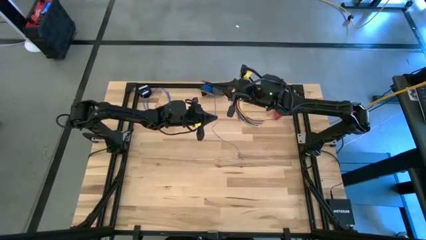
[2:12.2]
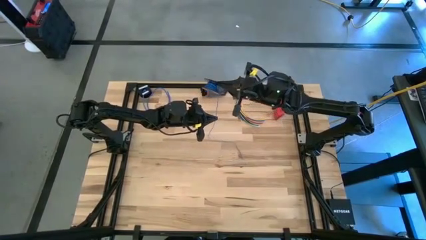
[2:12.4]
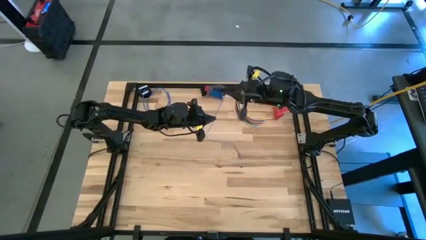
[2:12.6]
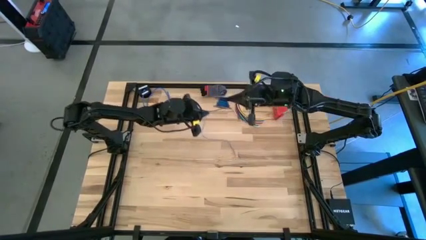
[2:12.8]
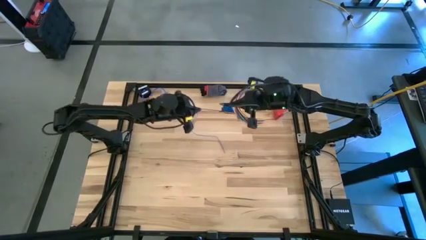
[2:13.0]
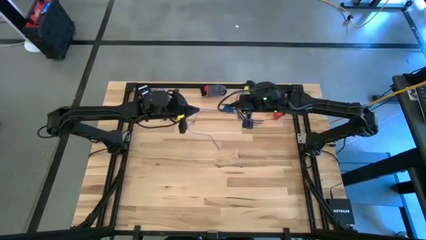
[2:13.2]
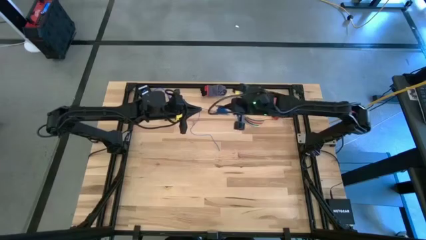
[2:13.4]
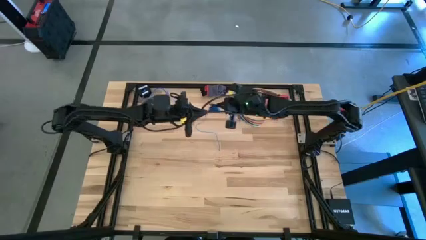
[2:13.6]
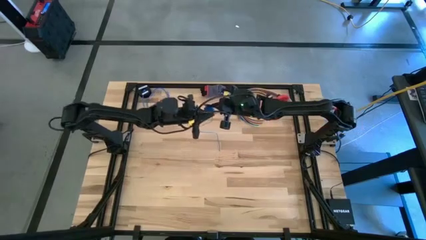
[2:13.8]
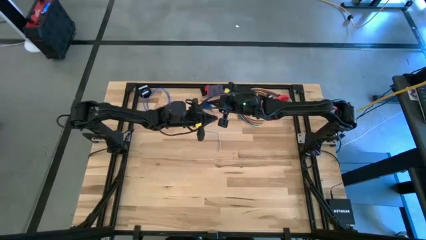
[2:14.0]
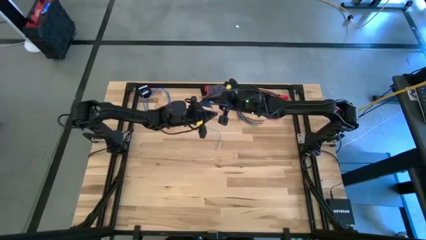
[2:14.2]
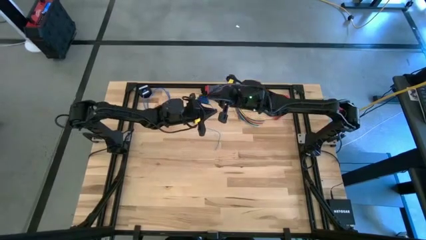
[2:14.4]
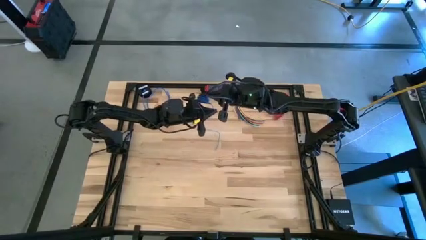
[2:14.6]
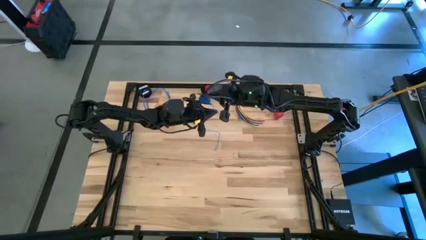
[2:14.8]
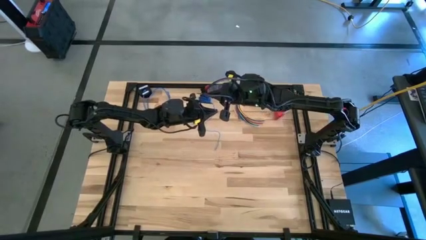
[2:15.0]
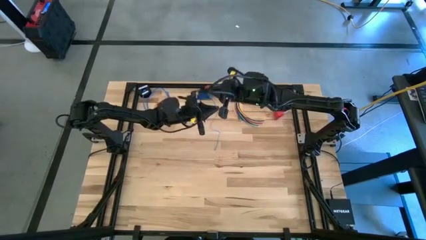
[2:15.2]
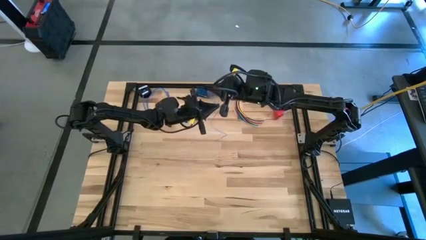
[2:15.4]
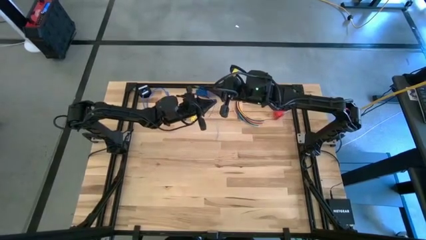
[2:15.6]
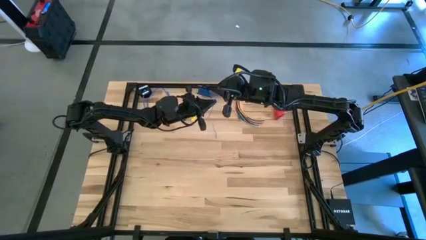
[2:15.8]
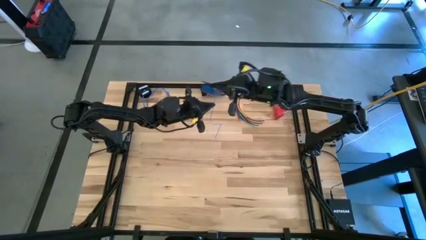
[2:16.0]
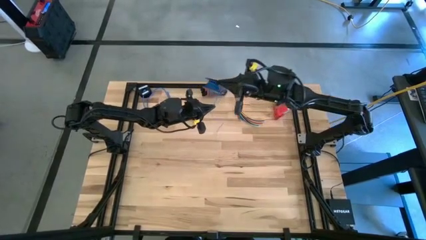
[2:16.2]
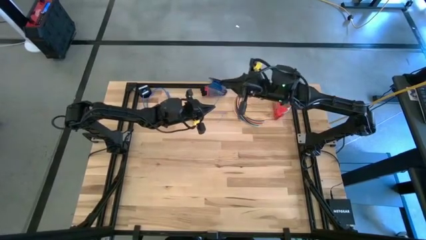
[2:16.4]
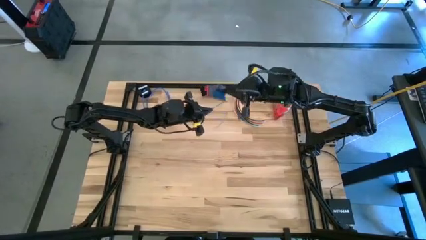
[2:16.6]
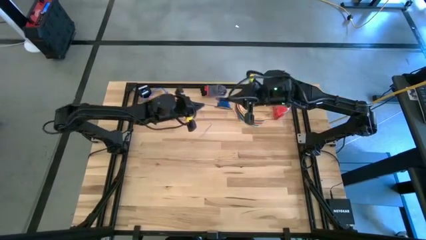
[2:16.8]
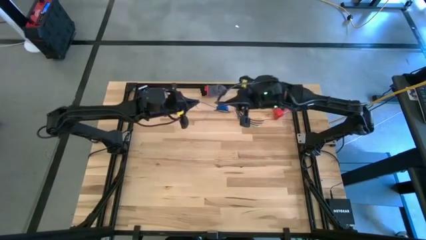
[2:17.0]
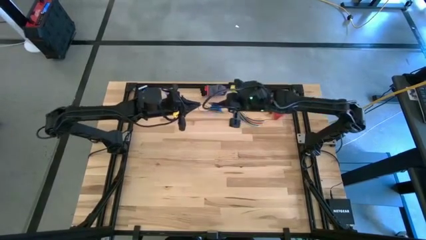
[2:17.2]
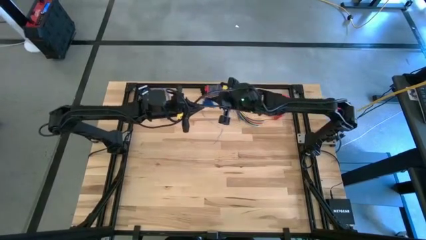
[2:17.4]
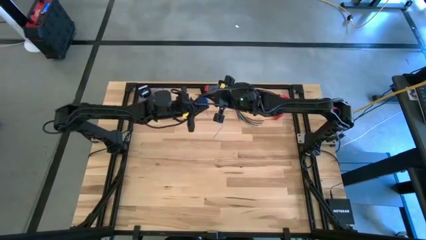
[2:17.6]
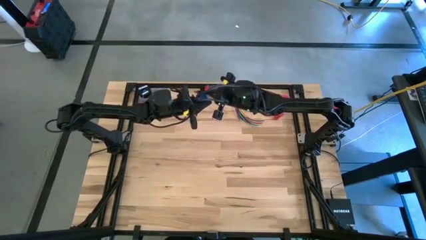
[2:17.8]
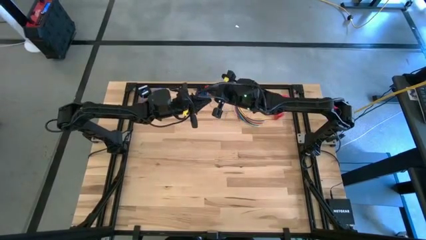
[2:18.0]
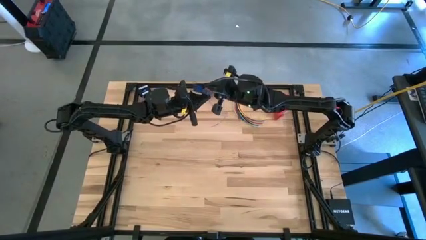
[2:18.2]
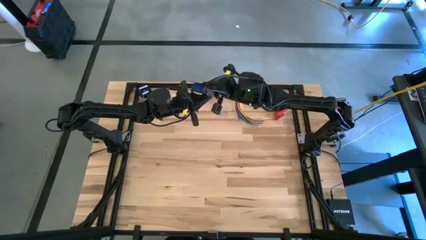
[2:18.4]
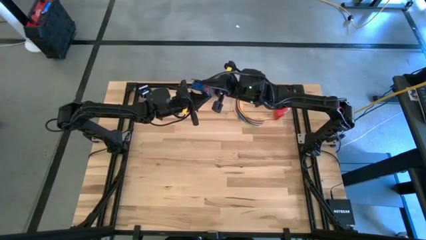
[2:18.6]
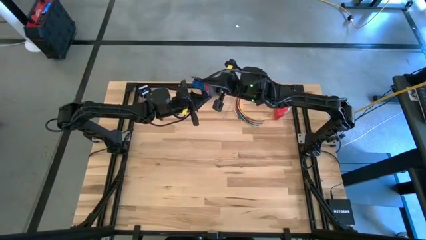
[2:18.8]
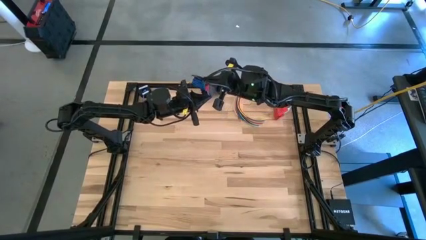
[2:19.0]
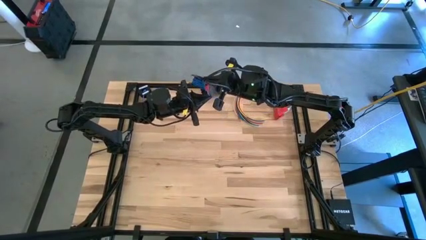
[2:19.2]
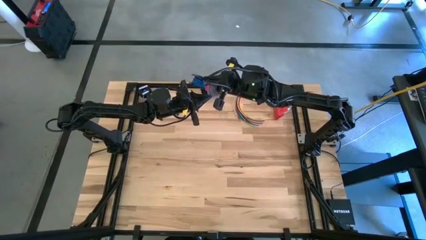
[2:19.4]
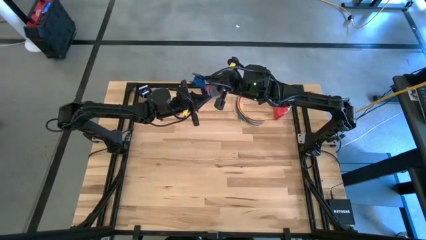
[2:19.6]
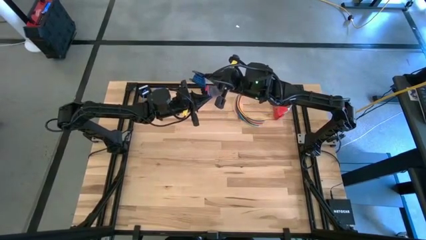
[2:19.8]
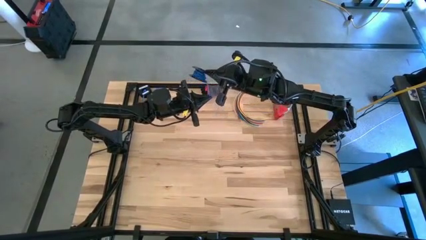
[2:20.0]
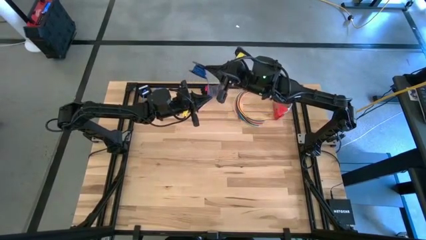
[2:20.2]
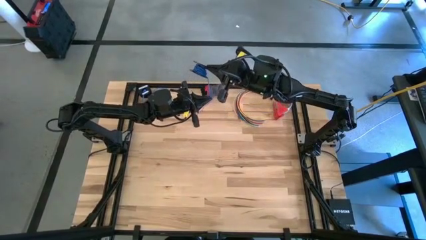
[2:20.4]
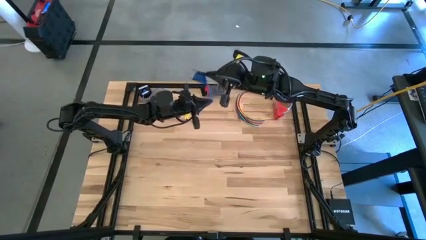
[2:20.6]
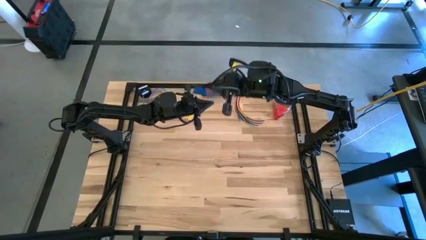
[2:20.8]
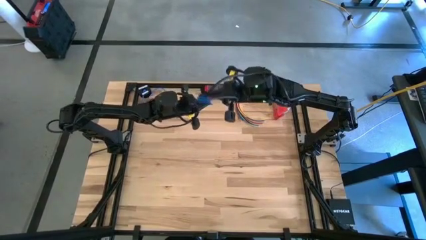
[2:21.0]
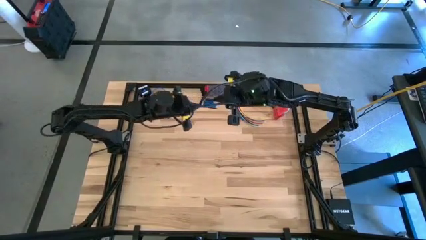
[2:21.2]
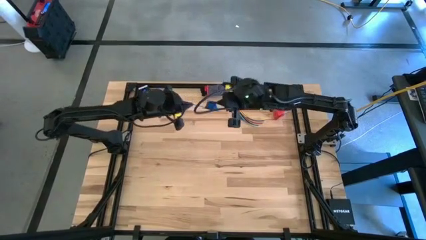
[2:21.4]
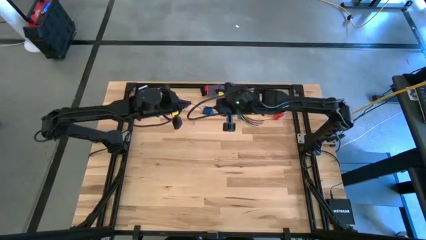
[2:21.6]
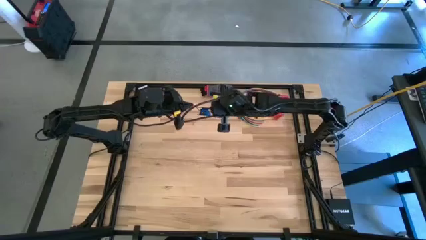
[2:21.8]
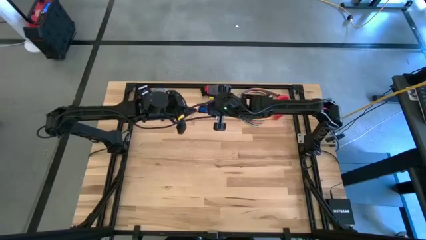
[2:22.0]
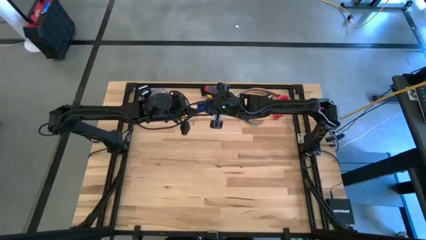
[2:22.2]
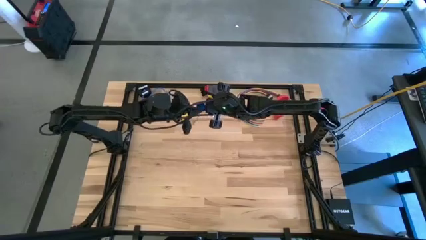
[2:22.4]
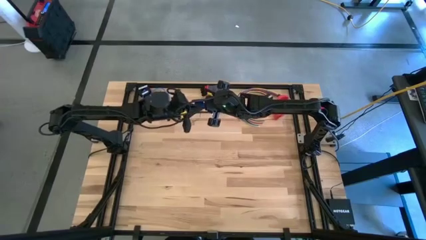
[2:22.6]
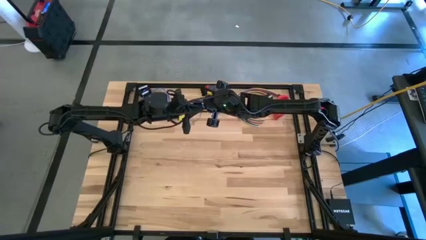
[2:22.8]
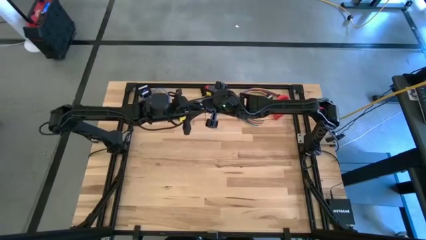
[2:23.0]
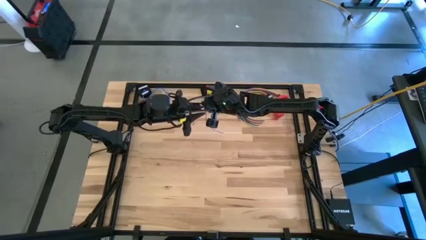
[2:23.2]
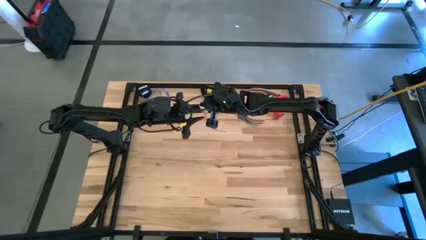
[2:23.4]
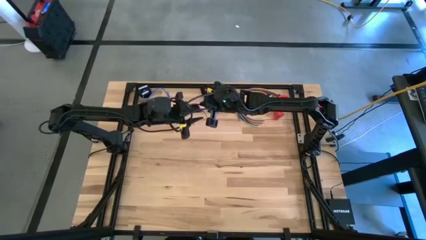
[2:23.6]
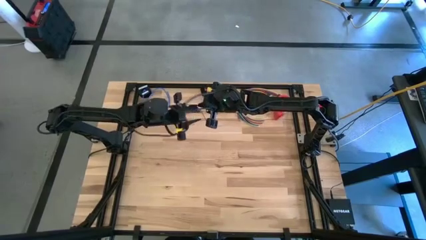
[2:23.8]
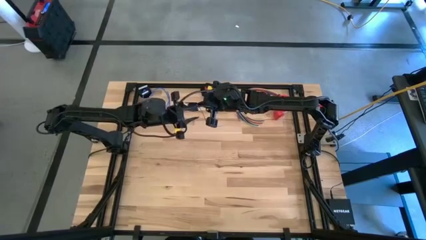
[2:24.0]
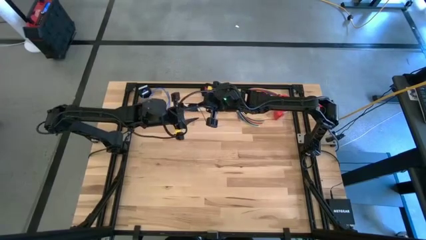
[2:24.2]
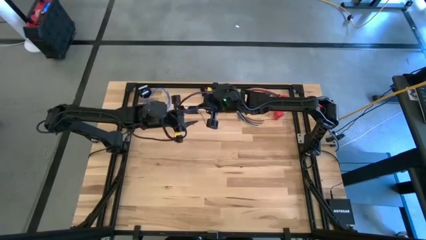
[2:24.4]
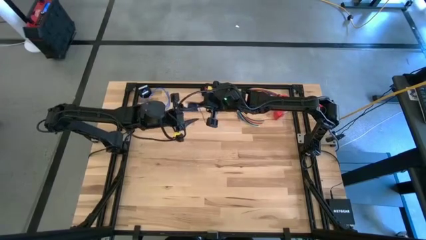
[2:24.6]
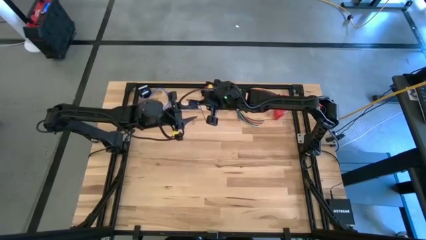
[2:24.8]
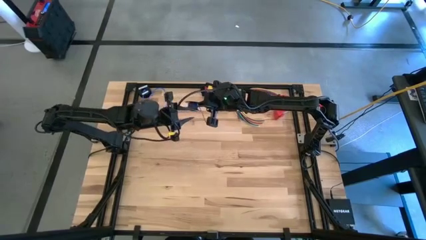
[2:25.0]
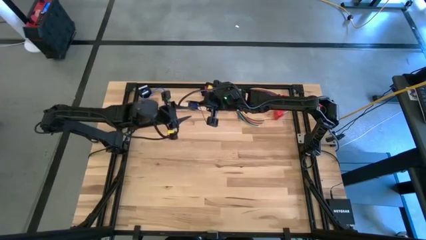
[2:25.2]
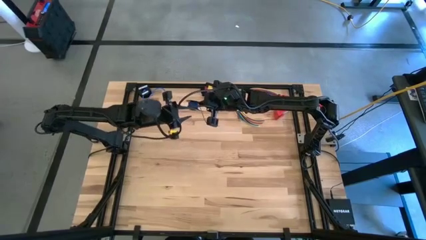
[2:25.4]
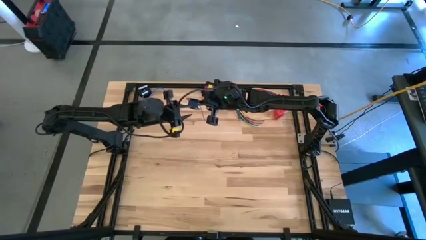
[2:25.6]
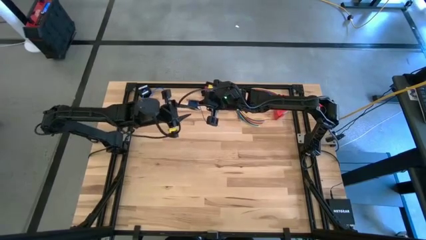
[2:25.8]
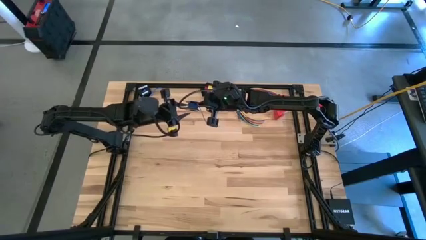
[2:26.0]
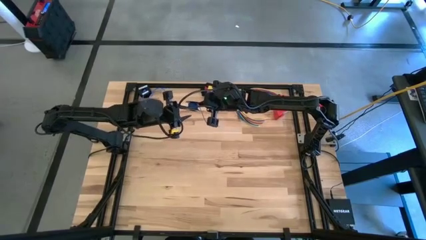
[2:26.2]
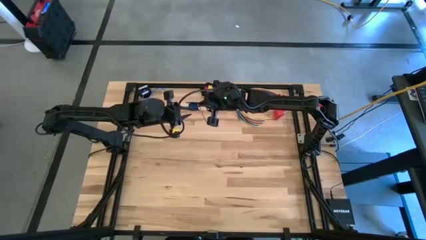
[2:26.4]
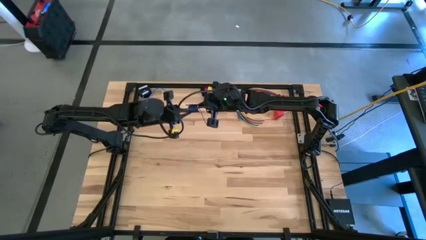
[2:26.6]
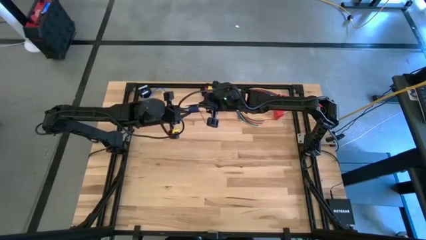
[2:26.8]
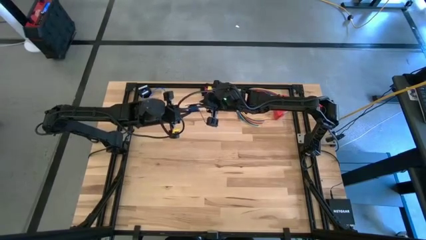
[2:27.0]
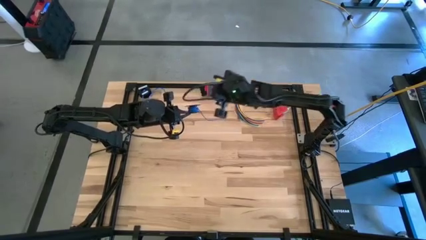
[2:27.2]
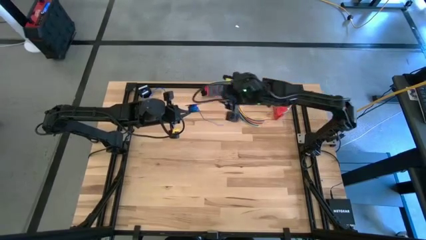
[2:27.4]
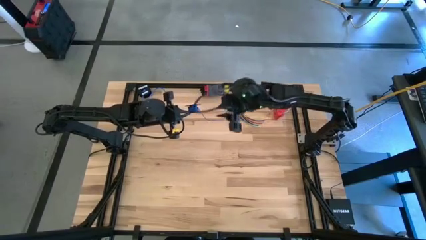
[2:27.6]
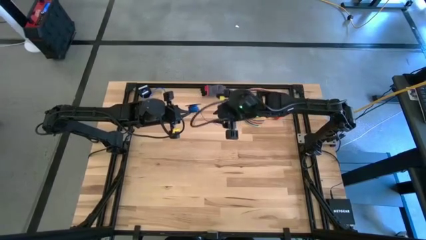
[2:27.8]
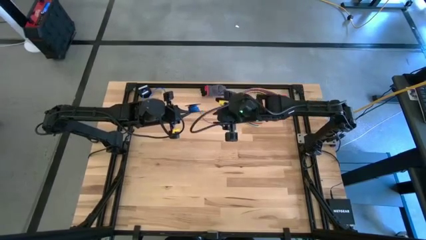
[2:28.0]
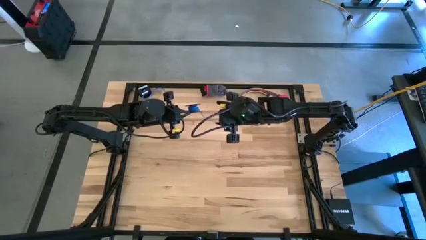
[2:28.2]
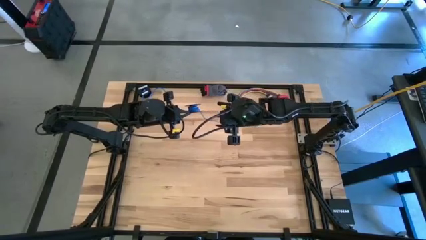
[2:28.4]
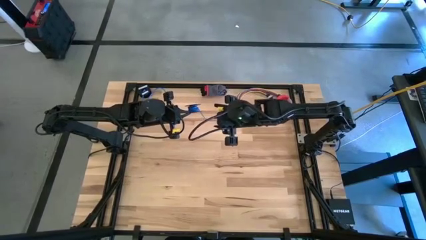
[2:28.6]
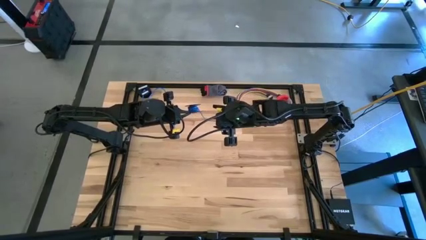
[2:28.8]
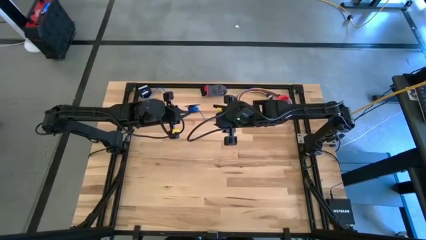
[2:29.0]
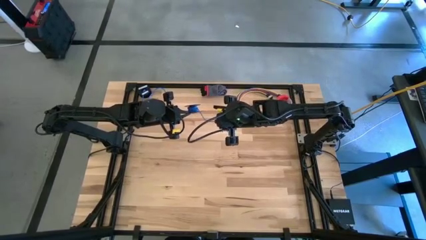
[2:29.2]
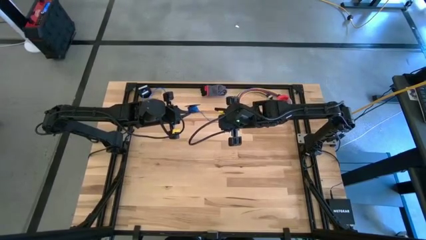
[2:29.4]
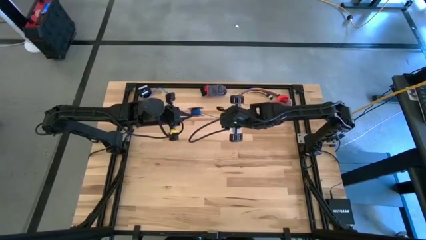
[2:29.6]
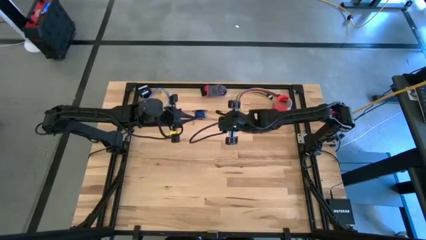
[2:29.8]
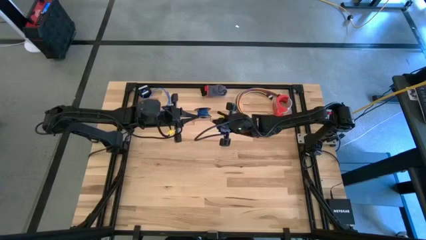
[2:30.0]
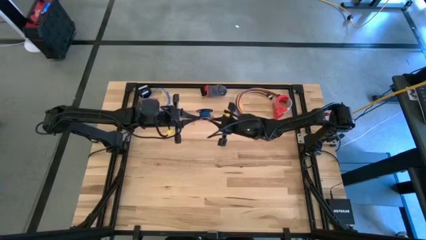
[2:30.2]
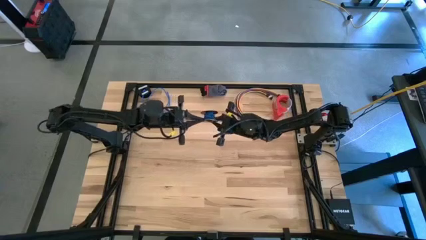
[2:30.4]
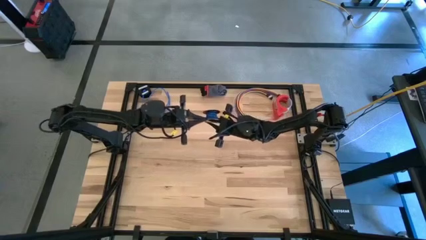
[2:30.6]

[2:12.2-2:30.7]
Task: Coil cords
Coil the blue wire on the black spool
